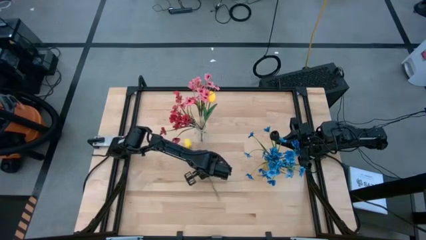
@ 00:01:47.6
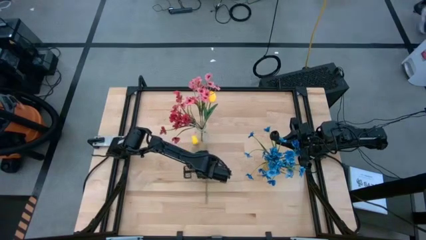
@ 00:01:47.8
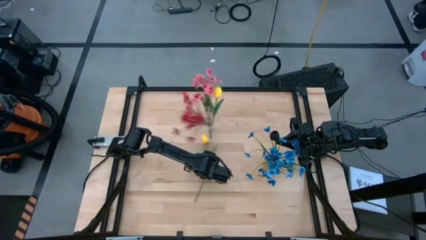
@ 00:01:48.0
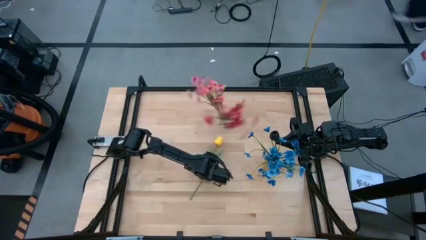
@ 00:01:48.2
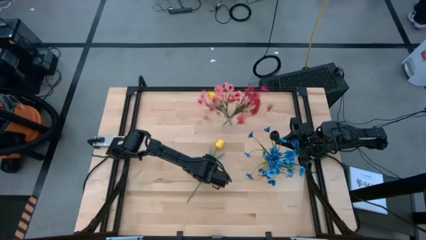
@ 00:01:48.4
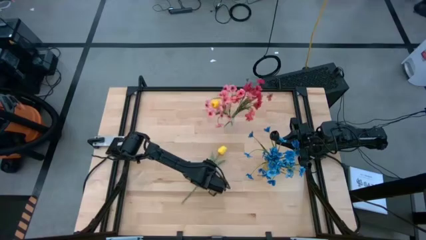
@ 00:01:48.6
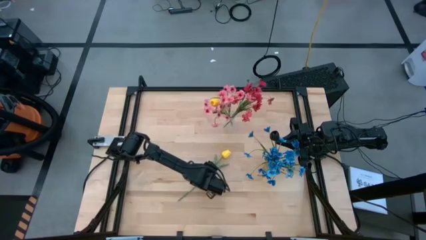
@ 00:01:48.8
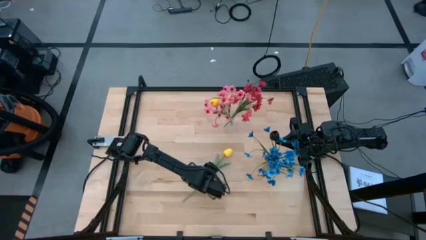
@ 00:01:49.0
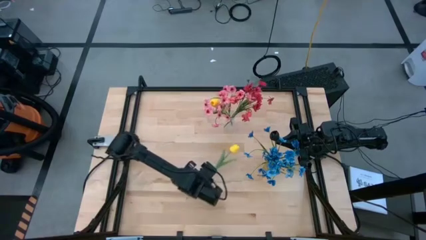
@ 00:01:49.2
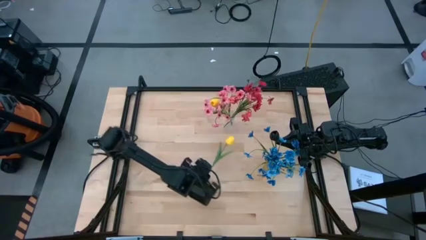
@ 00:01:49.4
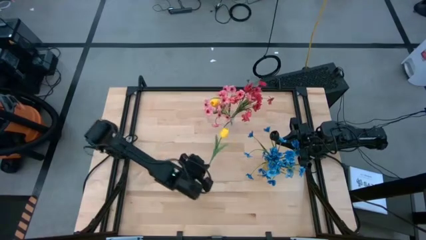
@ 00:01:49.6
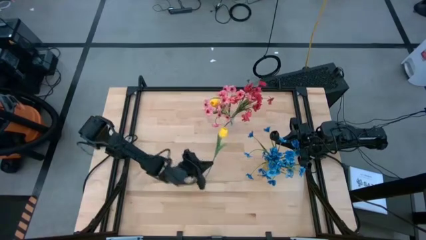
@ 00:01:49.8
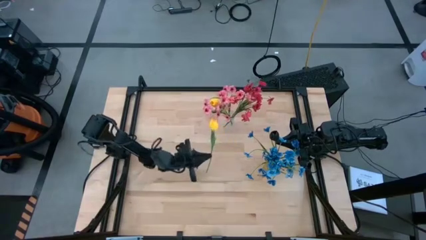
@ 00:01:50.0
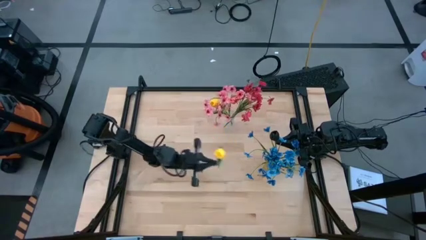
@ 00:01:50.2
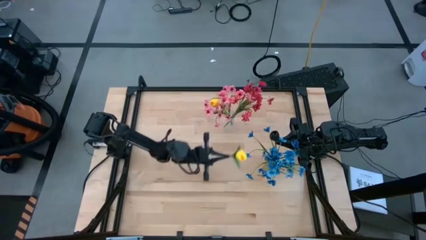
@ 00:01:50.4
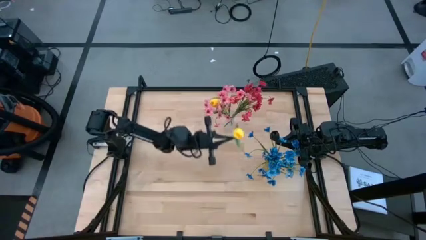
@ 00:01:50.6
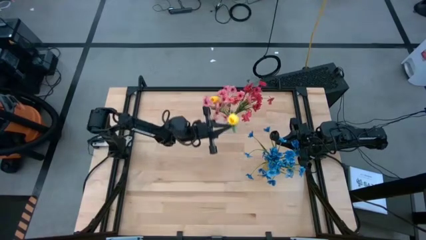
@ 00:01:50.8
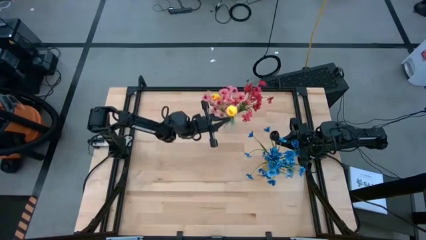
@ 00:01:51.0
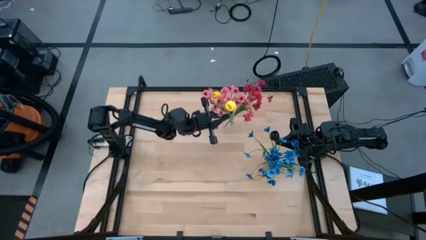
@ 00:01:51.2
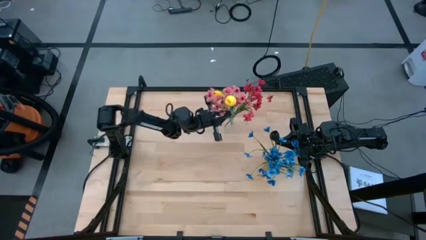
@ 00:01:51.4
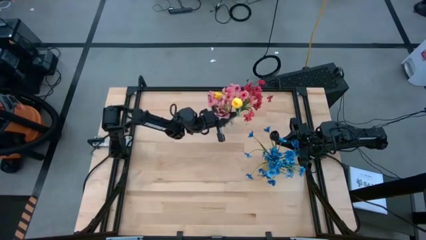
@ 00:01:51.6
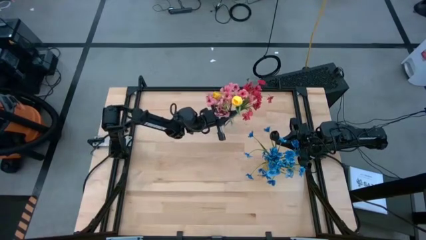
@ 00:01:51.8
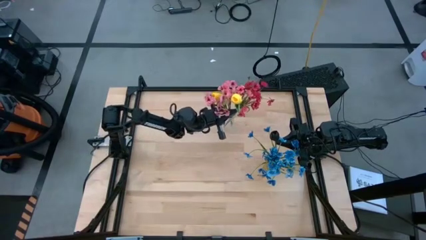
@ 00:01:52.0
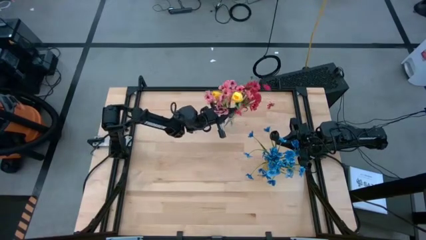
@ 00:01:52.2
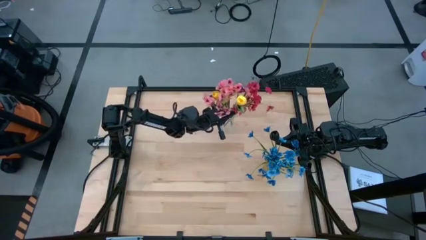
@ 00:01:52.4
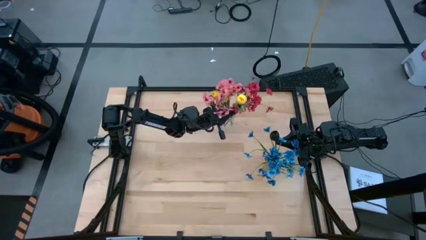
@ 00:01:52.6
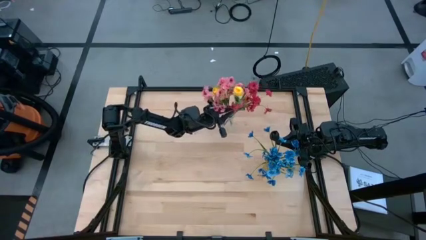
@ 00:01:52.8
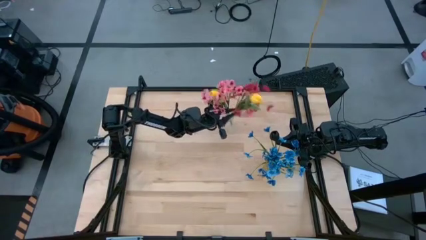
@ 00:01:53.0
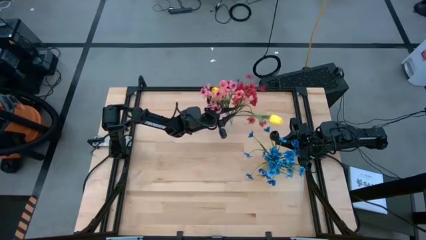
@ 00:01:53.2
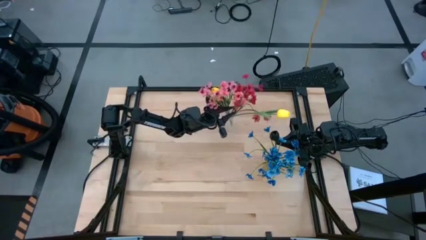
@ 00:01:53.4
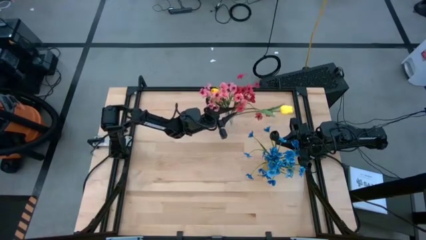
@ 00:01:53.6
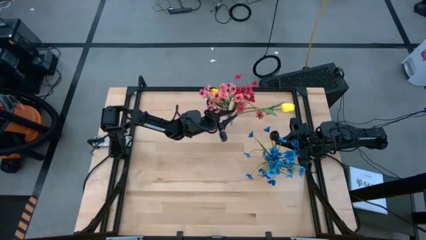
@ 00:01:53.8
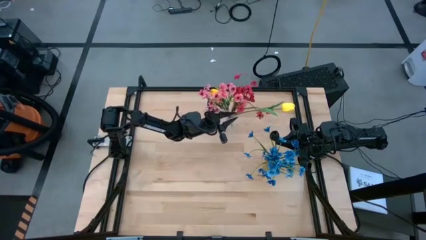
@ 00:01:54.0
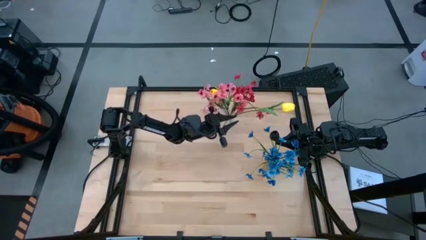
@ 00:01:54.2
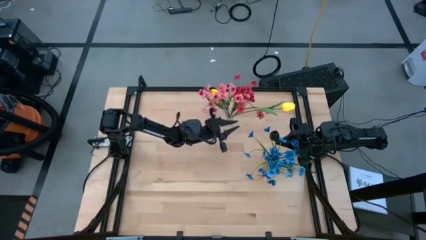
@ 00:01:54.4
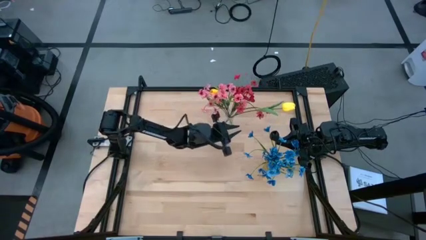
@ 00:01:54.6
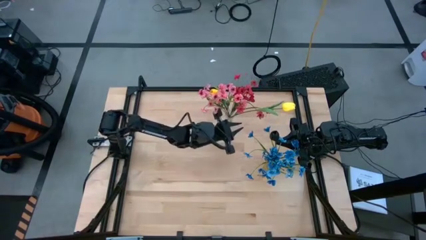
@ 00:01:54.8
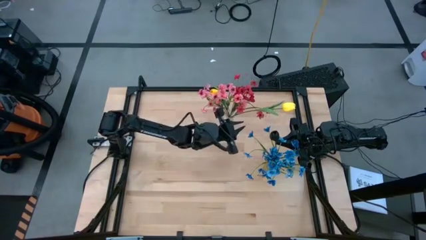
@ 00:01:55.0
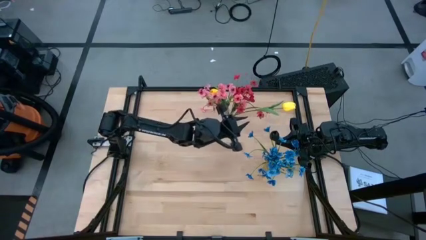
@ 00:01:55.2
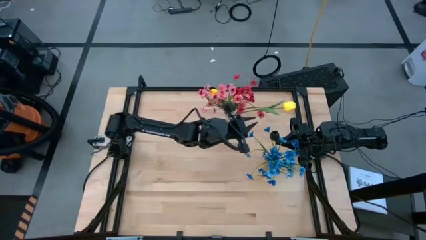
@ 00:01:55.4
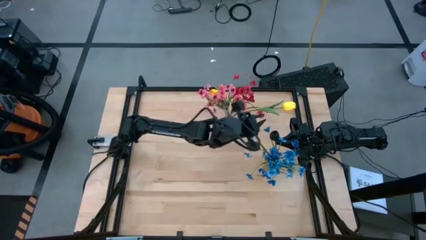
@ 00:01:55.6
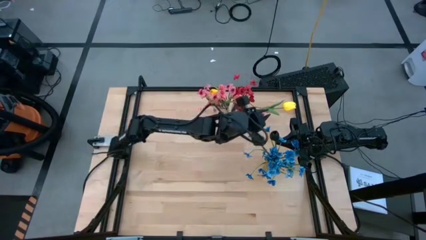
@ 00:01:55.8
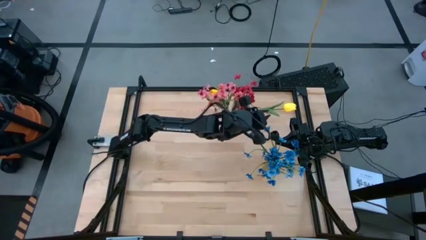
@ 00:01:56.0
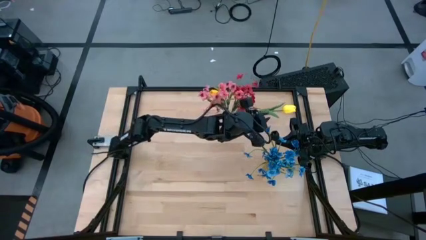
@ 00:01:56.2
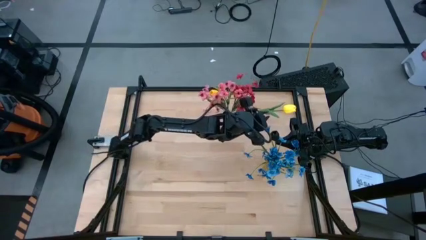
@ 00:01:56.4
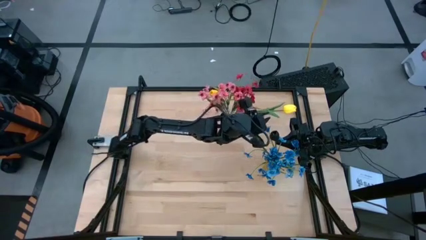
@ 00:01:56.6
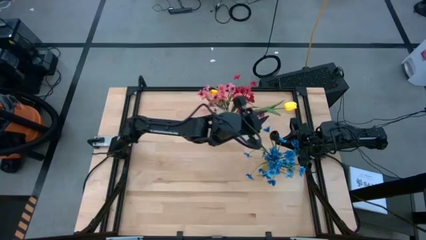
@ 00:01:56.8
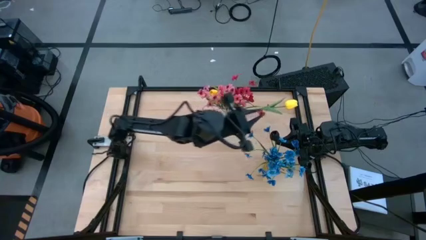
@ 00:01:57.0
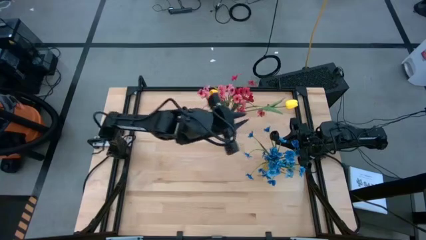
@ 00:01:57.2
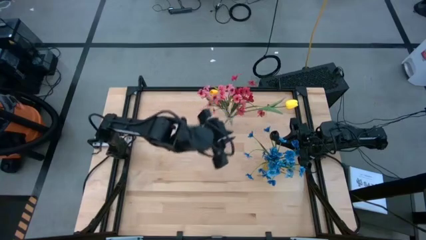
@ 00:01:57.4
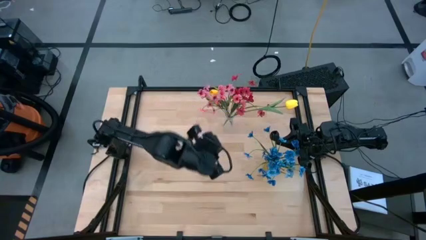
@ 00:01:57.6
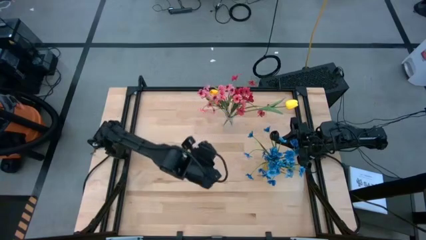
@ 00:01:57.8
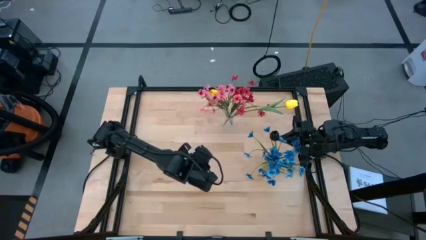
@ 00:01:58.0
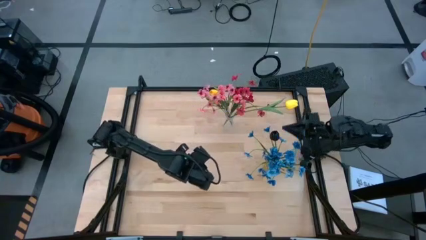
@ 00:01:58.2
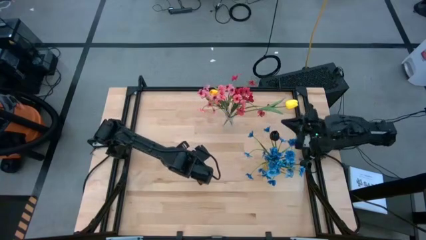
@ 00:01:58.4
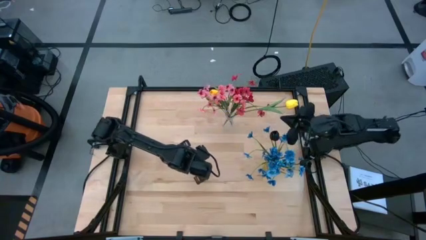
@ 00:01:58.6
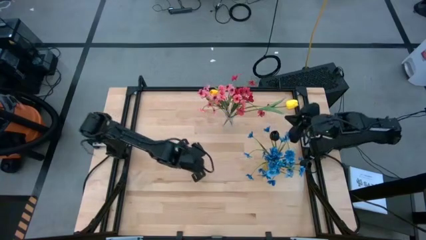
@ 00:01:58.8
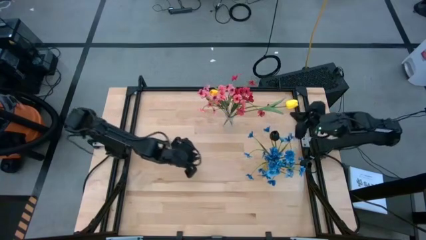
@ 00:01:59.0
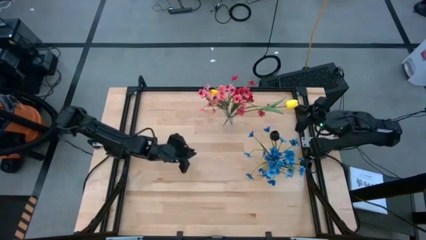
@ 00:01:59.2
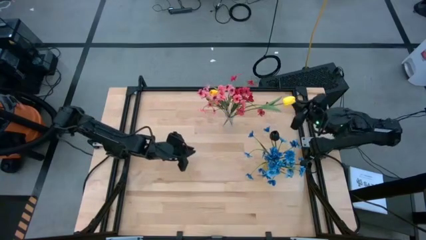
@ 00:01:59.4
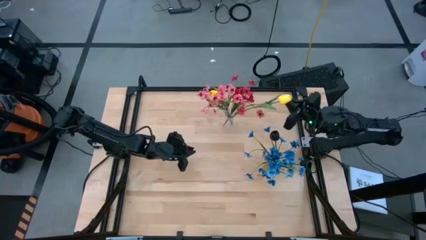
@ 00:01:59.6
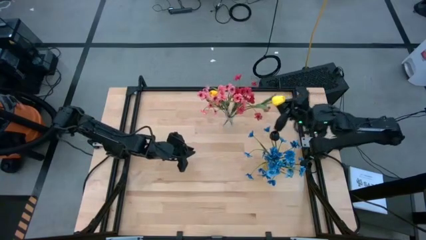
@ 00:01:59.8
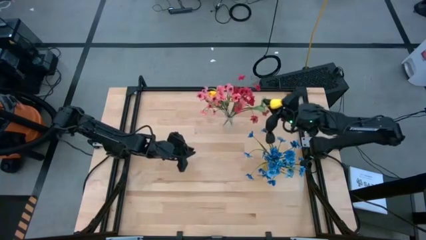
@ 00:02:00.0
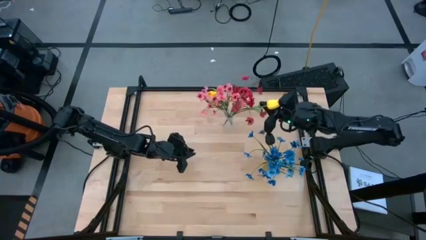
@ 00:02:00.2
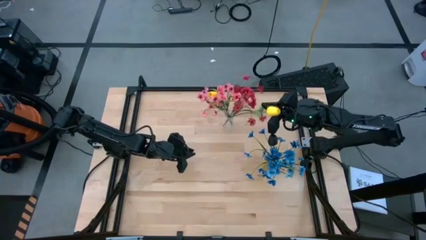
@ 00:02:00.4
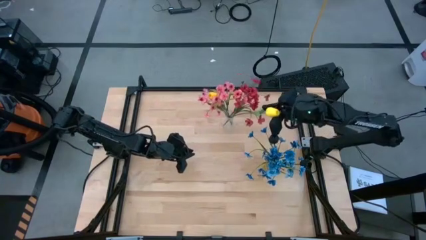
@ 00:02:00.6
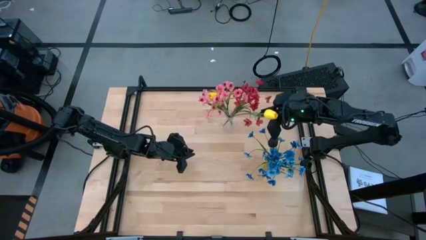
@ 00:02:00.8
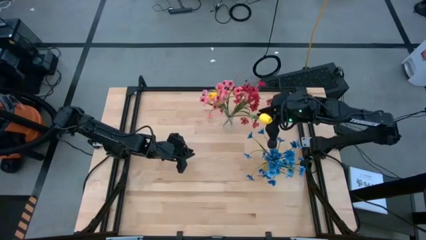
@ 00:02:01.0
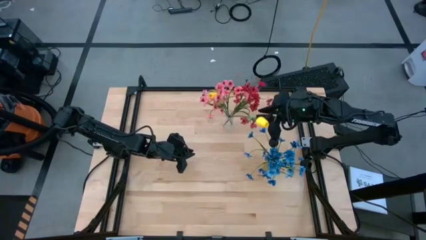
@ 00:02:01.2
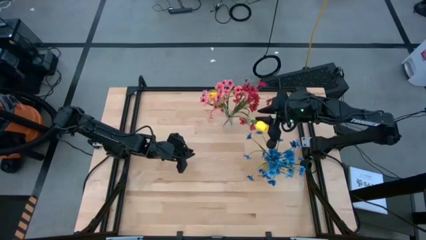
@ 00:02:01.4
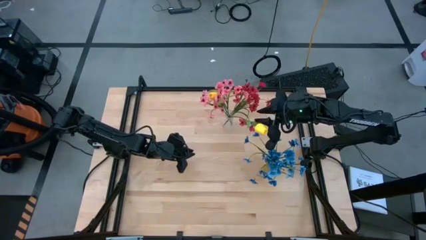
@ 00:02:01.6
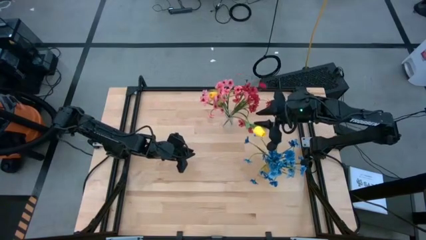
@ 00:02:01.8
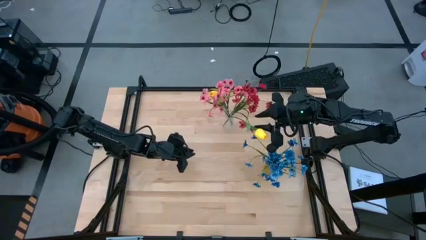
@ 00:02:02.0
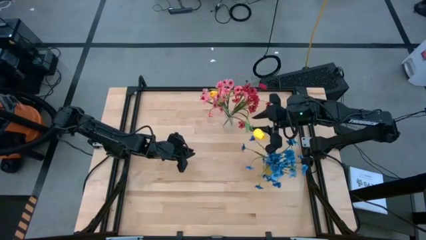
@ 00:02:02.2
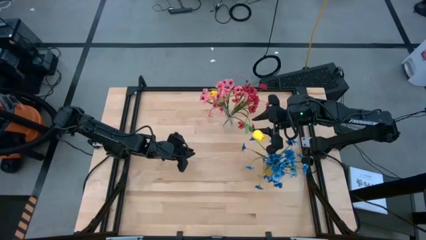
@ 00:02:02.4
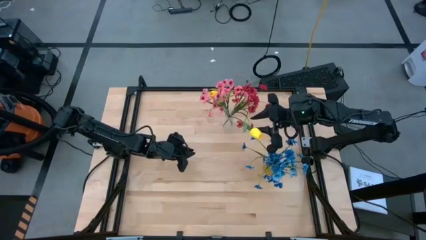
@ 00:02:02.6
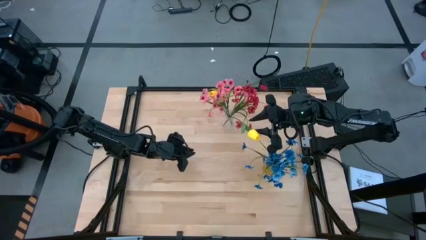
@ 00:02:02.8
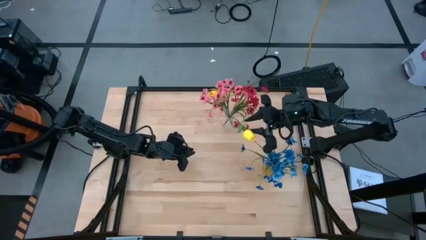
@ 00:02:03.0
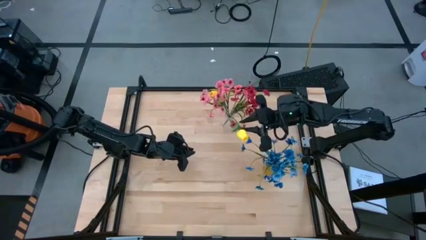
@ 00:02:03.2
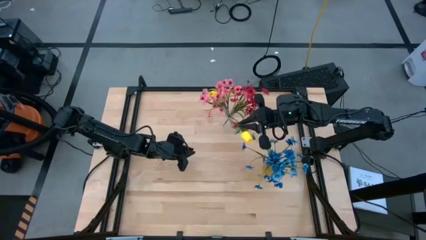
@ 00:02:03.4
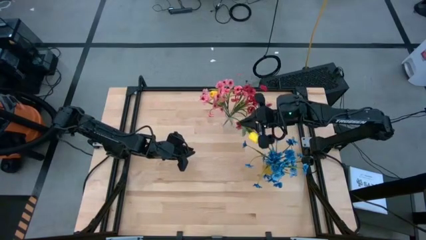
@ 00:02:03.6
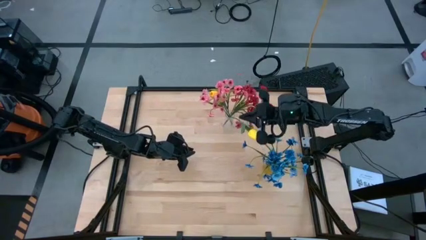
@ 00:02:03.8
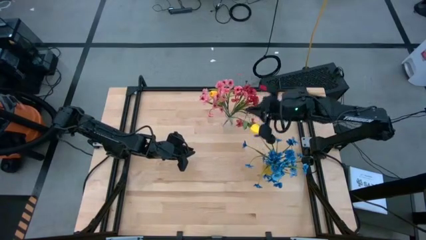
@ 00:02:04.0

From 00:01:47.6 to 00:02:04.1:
Task: Sort flowers into vase by color
Put the yellow flower into the transparent vase
